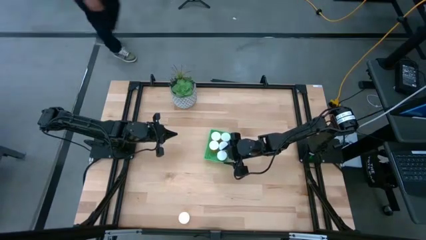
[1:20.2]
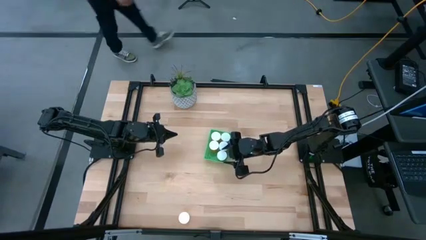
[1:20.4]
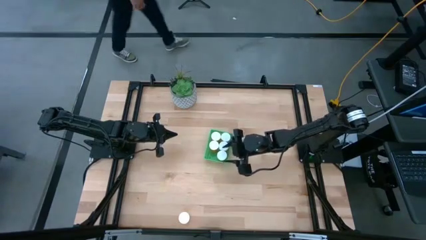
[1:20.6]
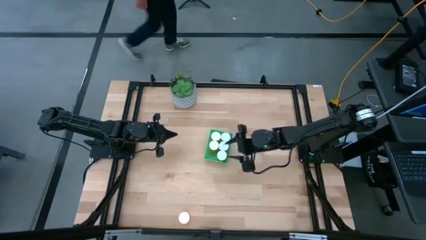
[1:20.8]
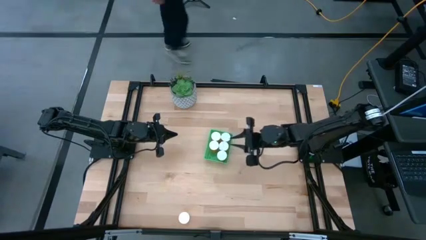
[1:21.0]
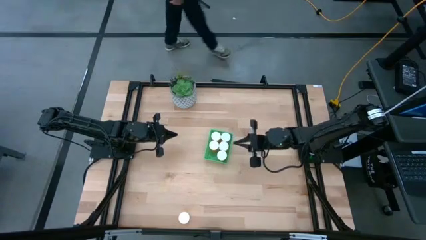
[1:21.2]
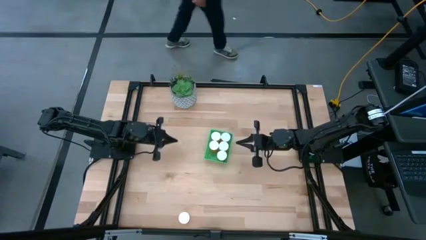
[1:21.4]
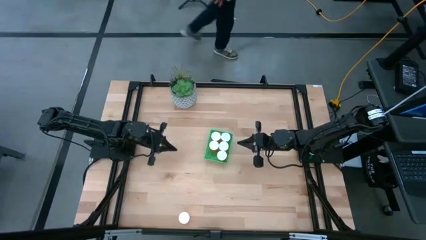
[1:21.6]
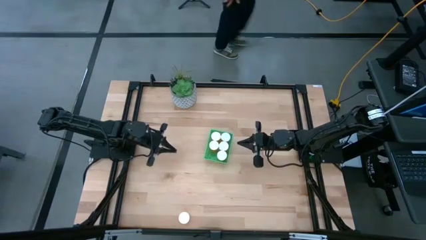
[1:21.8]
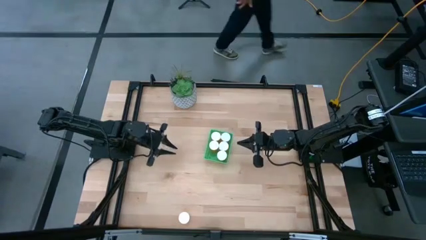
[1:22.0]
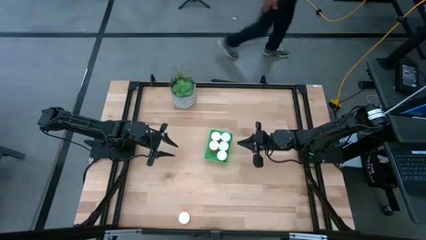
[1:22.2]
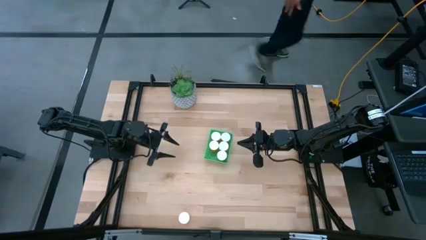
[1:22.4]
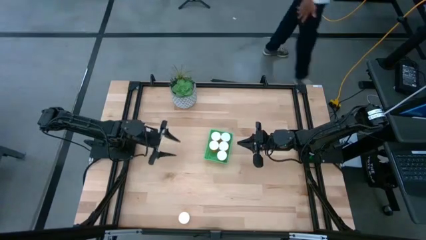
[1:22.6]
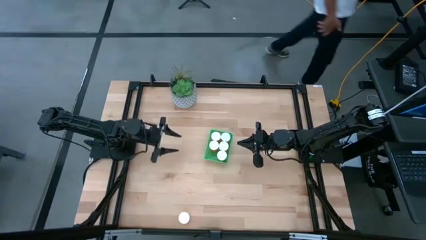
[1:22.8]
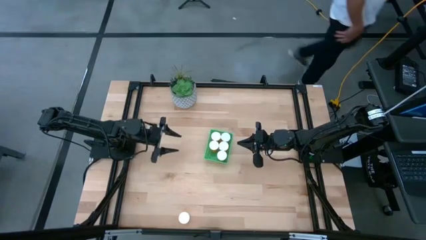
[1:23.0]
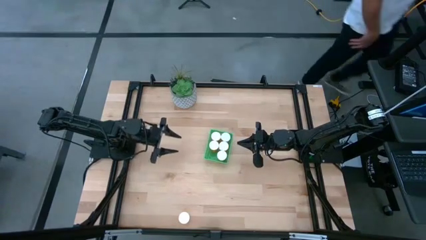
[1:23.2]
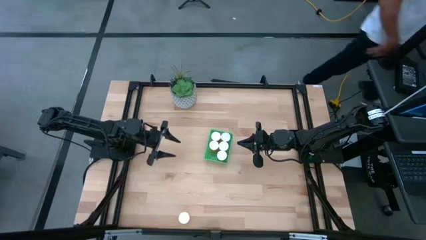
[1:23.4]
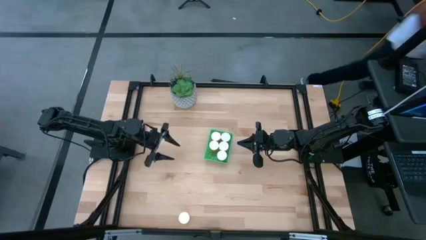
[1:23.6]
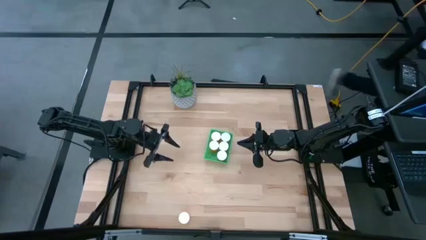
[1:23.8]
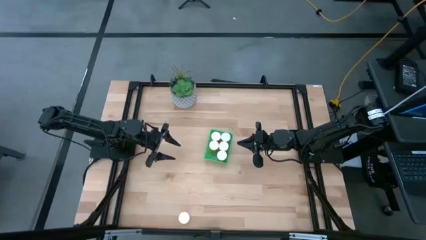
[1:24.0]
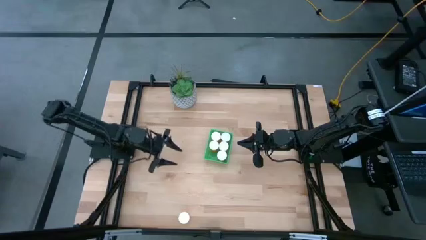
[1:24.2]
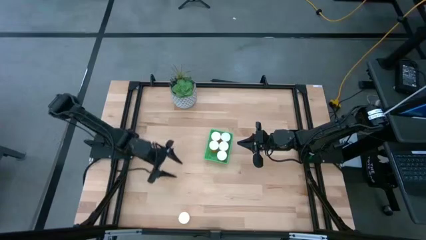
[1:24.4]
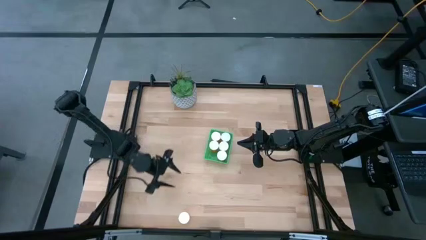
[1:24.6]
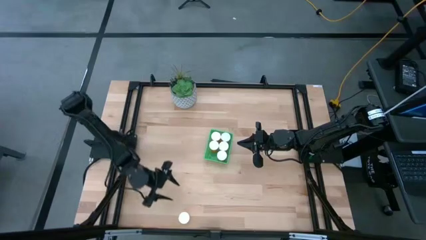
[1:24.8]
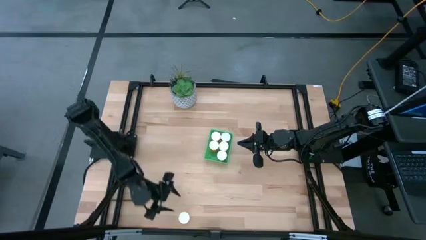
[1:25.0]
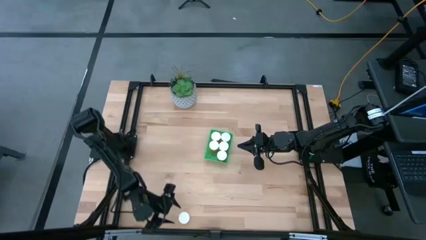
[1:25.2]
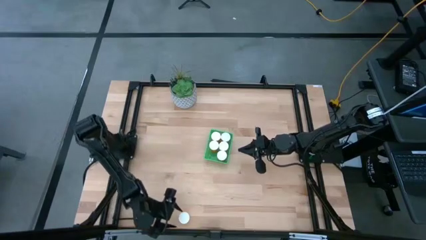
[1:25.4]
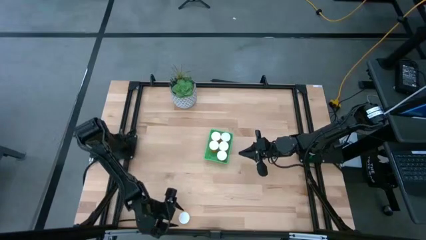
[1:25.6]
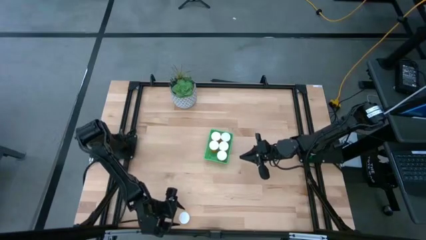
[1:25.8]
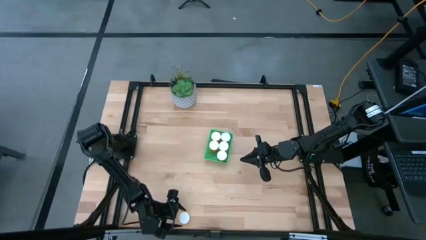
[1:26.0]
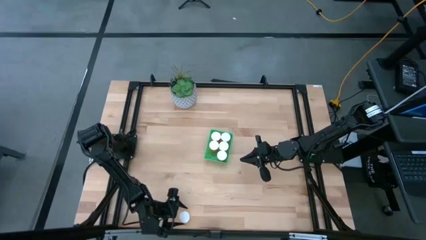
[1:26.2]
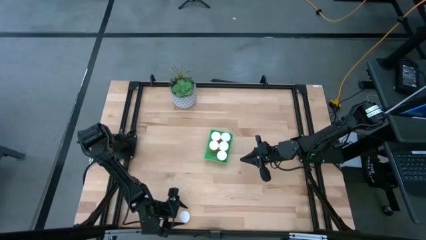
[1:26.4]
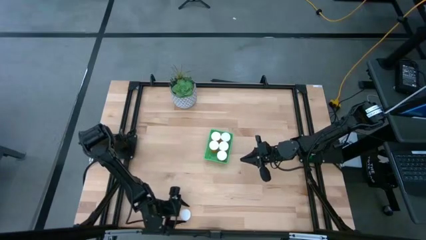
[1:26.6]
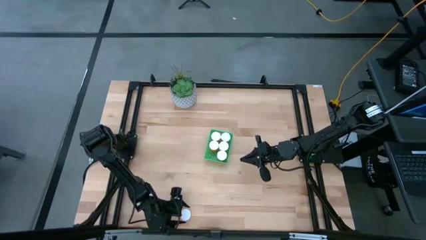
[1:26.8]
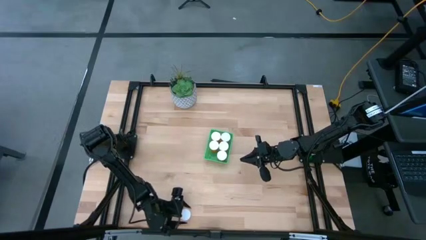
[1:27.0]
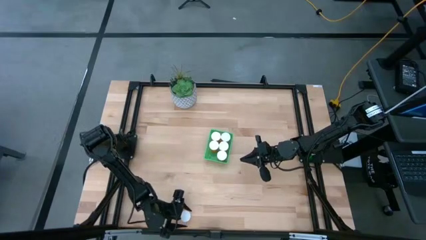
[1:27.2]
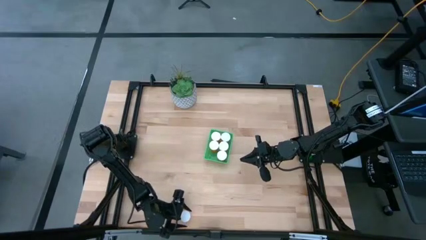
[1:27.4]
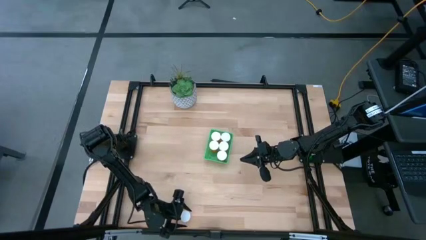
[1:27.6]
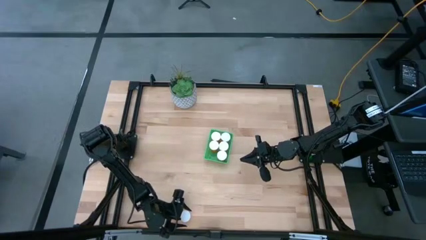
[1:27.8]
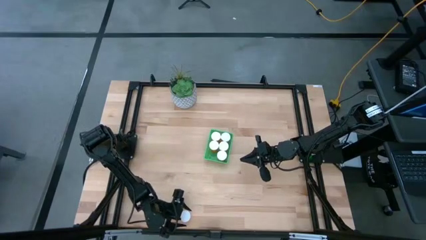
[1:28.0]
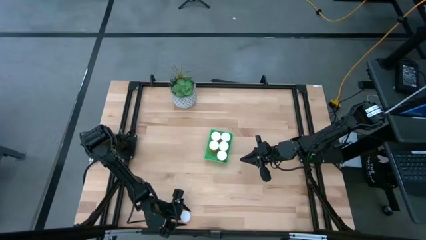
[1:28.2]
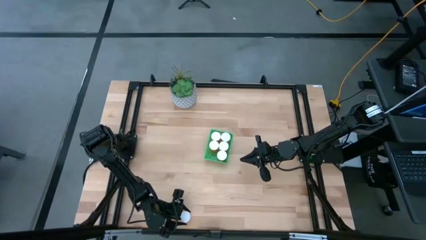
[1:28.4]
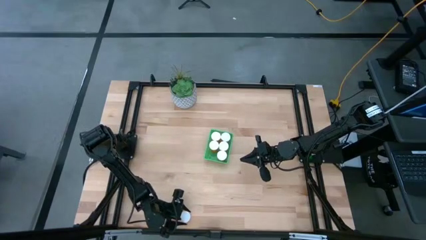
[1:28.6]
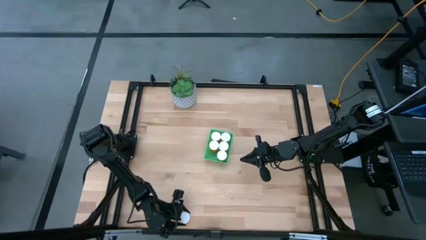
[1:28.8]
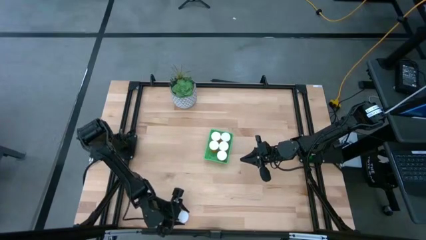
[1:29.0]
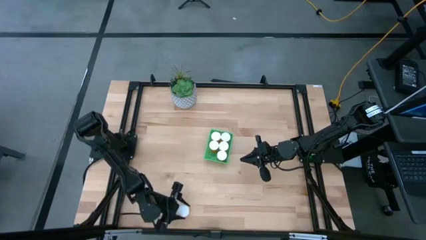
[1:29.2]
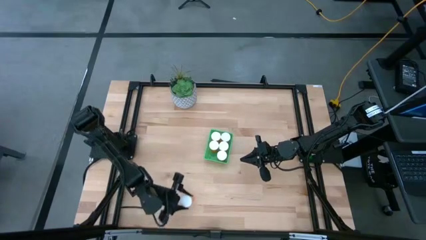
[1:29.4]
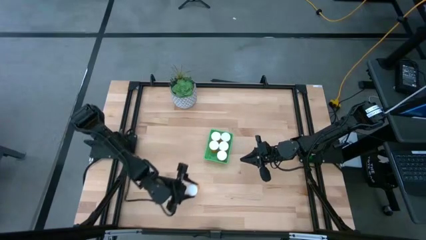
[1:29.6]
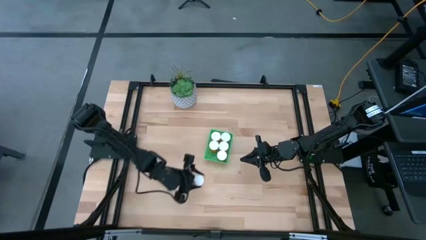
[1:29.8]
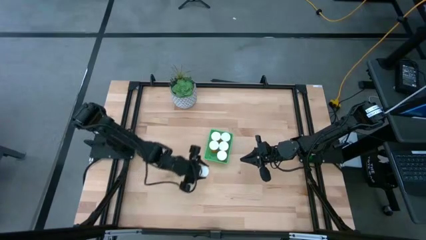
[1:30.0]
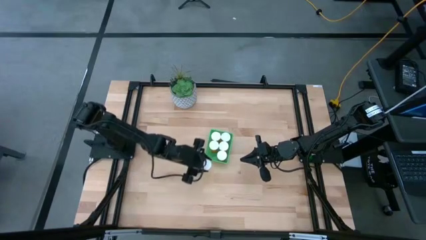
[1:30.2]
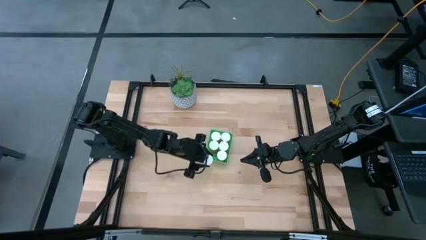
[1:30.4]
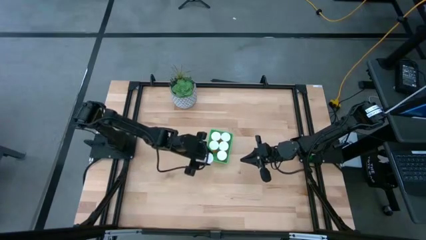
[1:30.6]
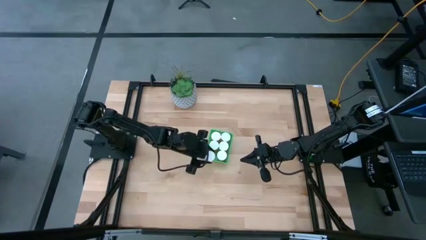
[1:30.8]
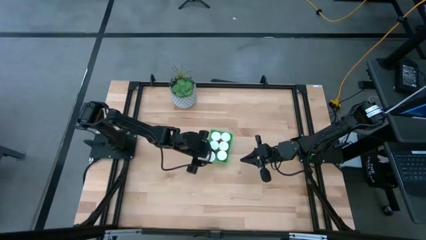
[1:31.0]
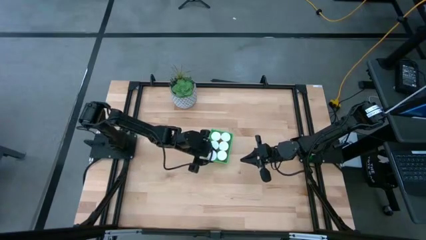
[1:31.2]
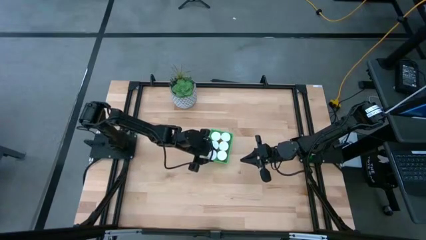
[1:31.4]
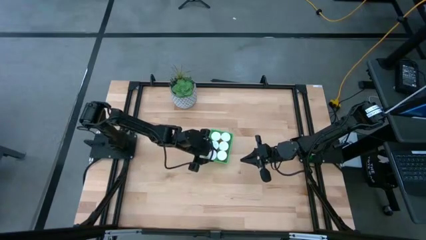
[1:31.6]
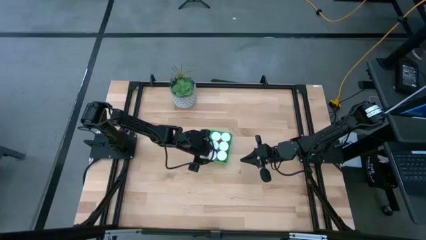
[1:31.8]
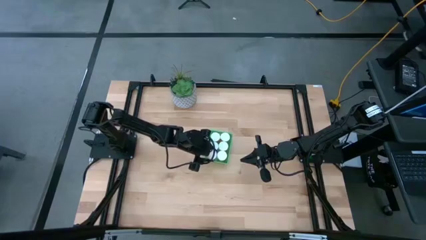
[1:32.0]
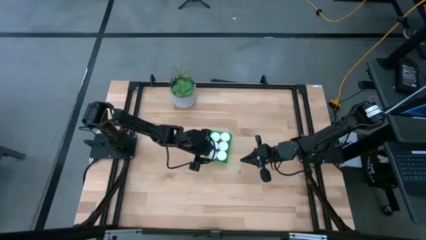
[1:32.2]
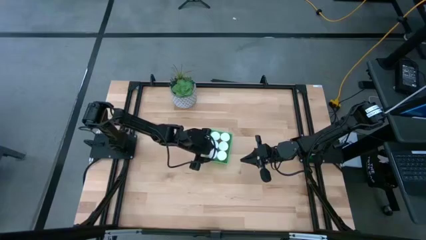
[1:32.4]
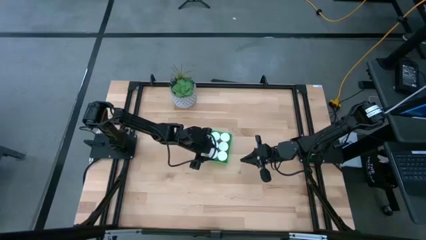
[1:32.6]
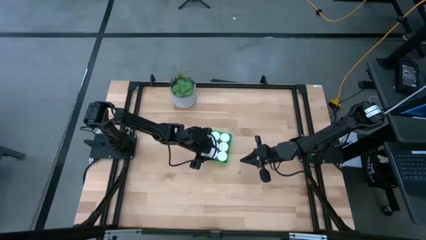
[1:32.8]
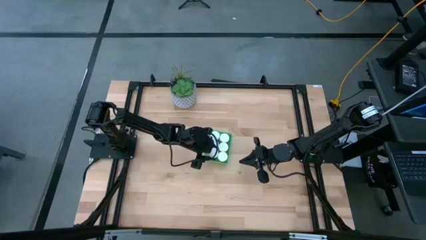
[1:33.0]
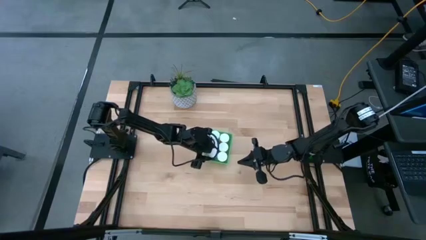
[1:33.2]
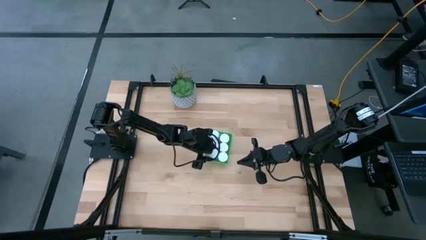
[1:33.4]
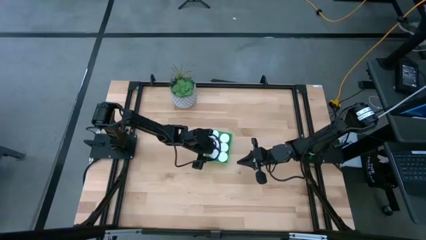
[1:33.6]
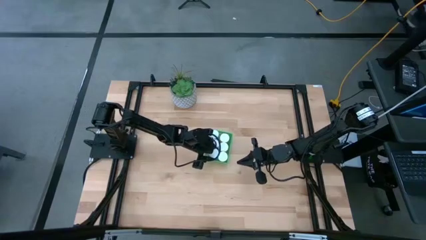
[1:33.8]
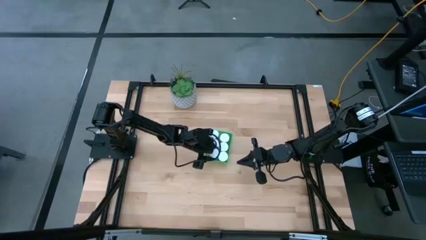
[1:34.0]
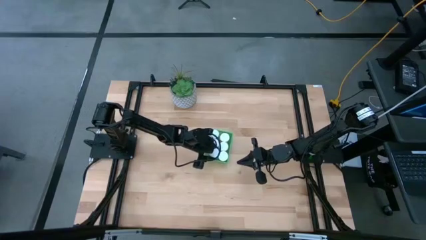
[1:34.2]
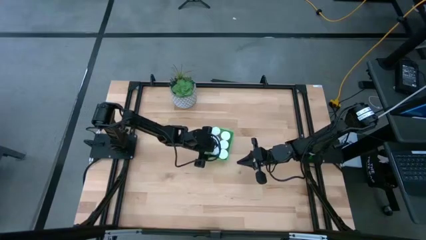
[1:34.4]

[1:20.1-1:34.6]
Task: Pick and place pill bottles into a basket
Put the orange pill bottle into the green basket

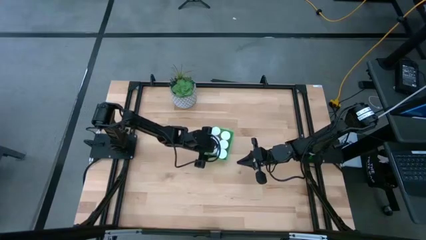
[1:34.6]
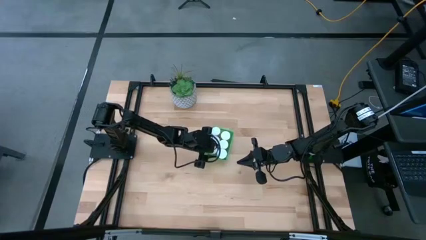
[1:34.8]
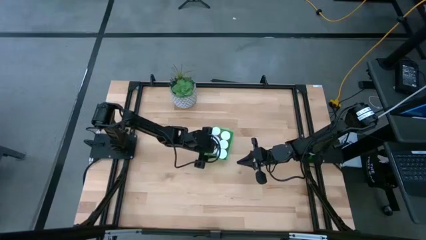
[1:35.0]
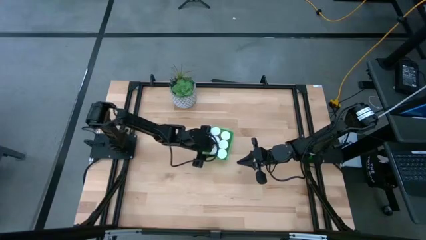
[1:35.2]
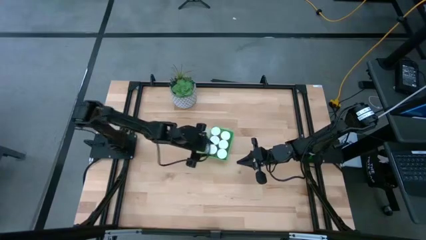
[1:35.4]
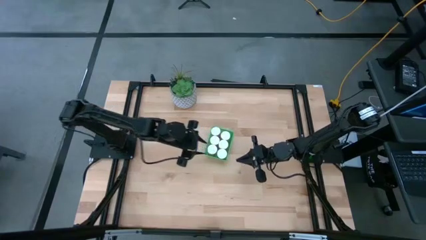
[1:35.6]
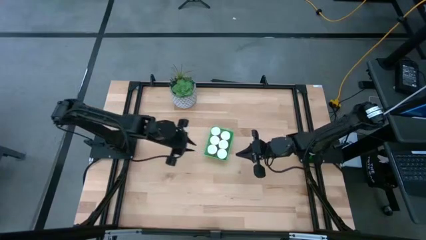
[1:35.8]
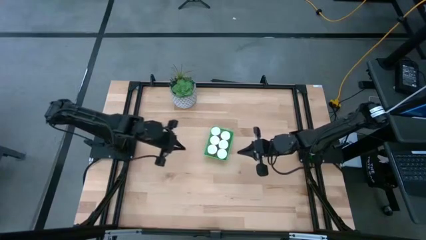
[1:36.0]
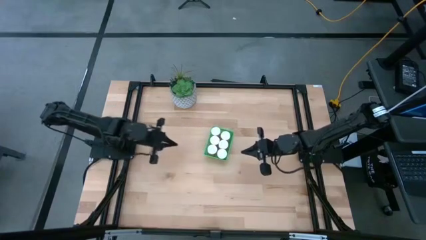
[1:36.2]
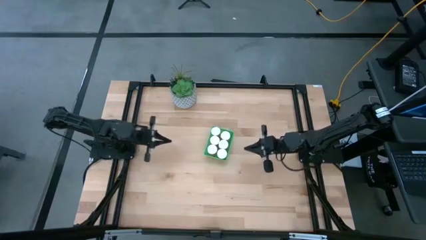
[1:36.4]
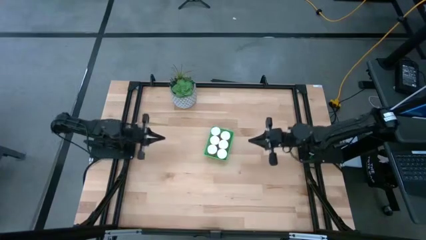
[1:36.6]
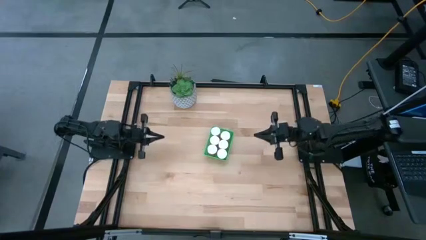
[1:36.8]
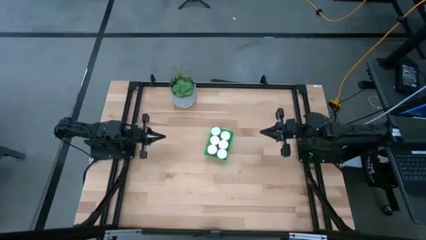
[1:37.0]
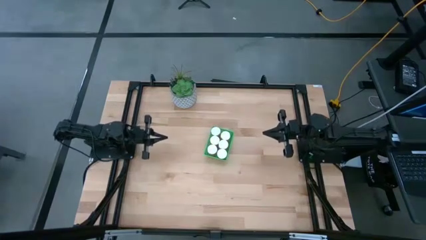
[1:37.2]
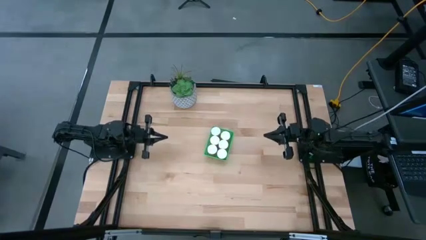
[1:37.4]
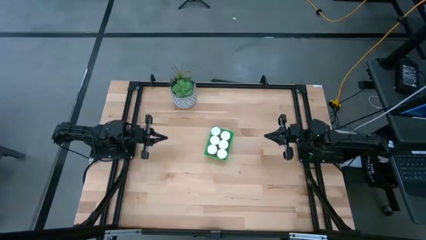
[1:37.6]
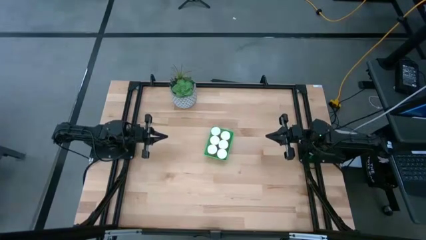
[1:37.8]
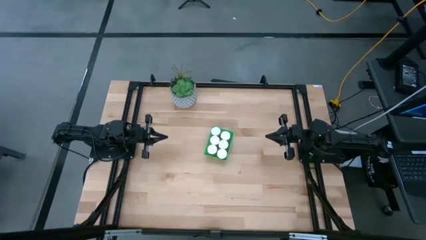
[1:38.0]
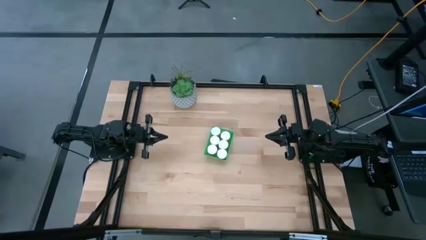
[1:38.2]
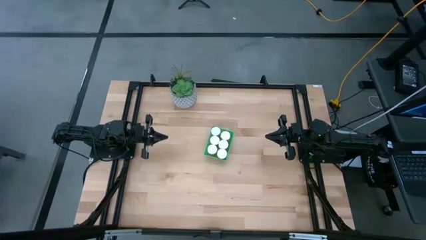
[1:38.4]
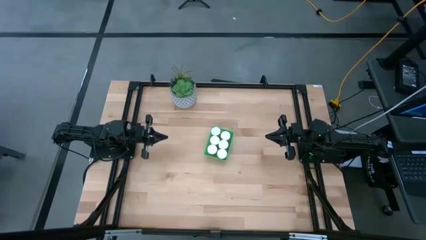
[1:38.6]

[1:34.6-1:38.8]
Return to Home Position
